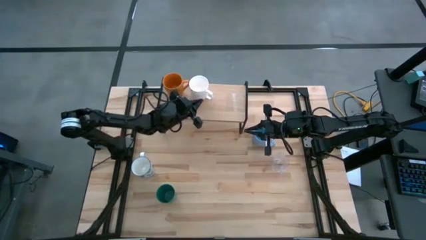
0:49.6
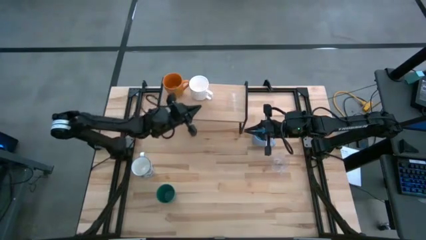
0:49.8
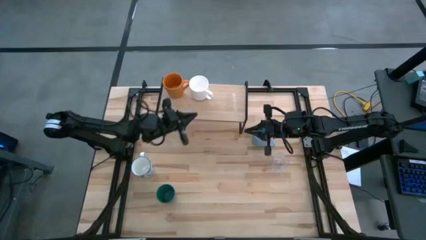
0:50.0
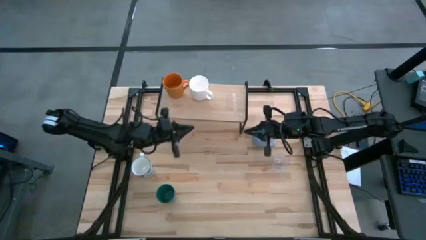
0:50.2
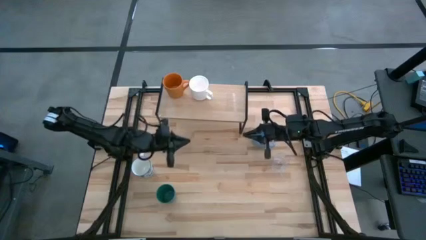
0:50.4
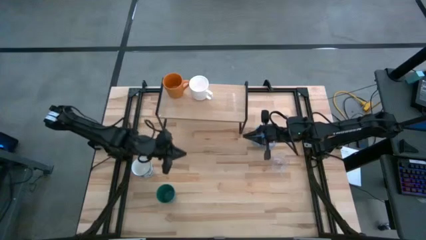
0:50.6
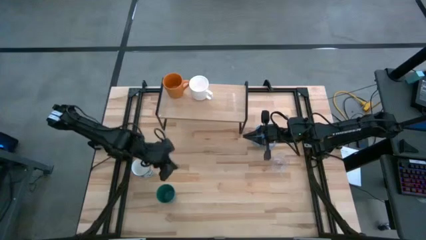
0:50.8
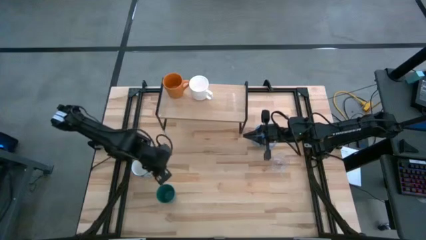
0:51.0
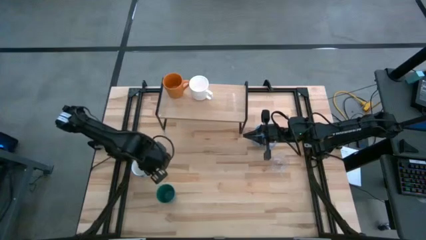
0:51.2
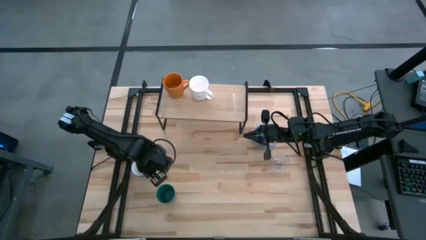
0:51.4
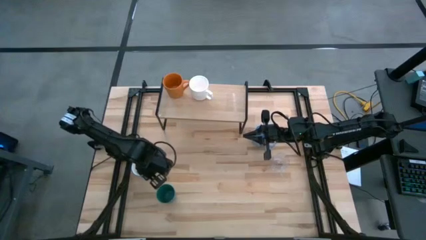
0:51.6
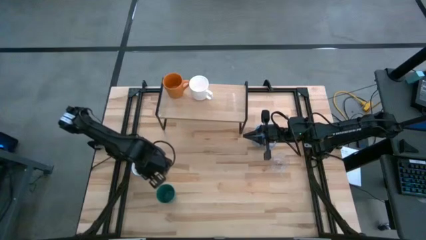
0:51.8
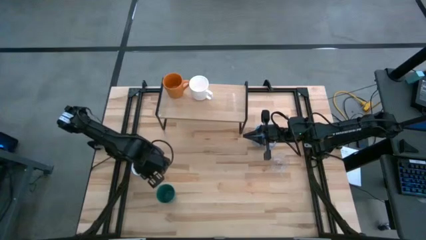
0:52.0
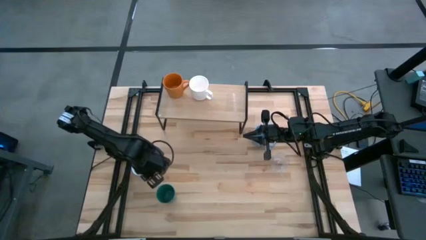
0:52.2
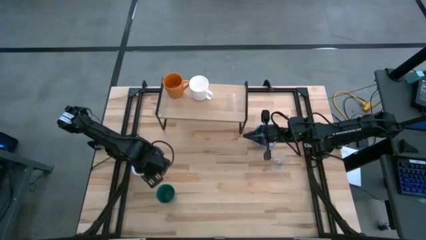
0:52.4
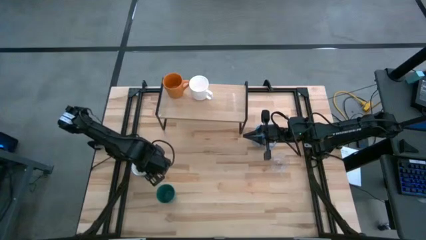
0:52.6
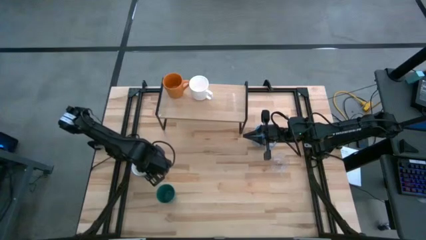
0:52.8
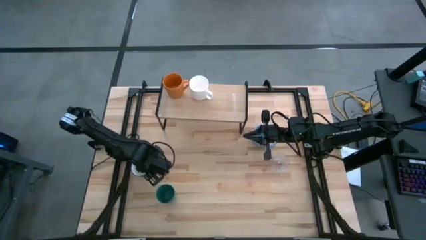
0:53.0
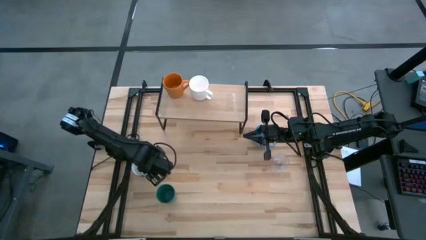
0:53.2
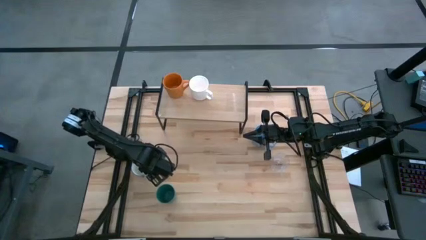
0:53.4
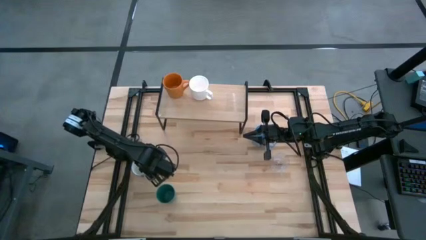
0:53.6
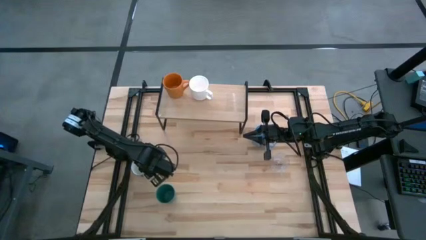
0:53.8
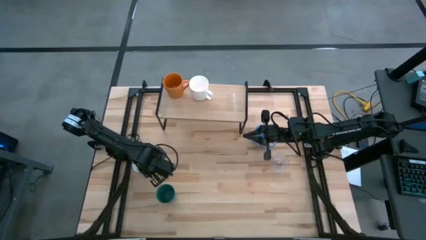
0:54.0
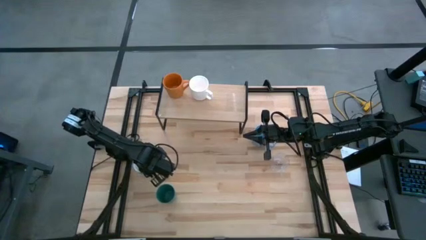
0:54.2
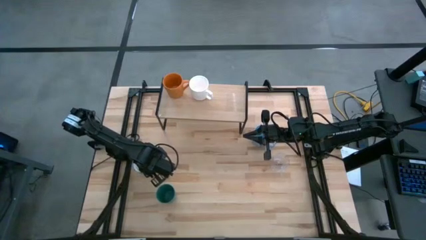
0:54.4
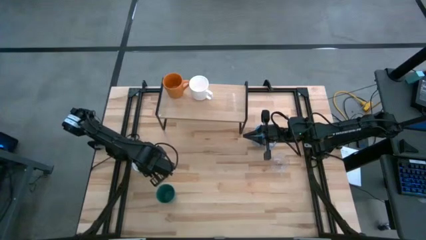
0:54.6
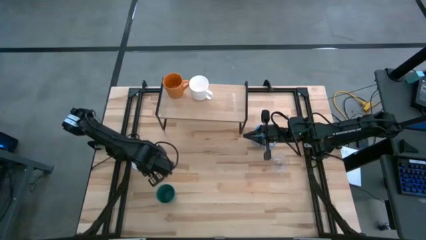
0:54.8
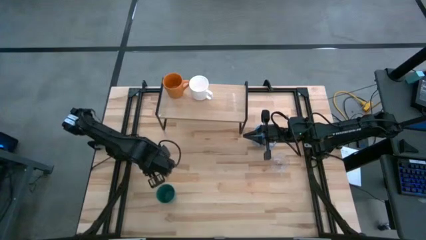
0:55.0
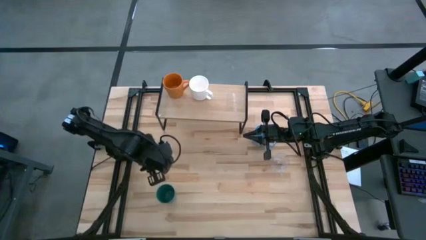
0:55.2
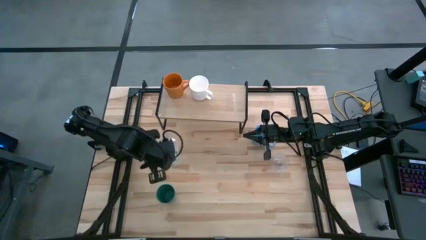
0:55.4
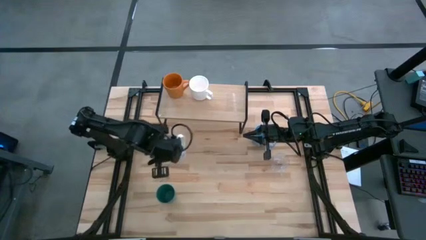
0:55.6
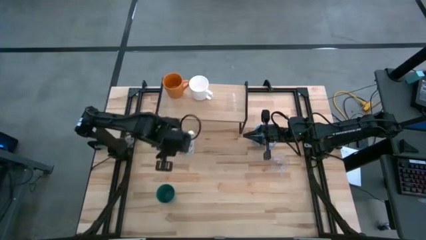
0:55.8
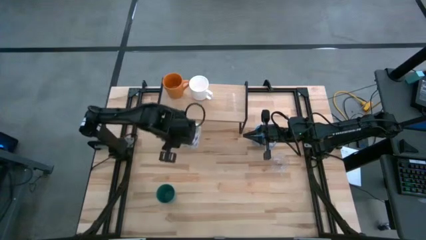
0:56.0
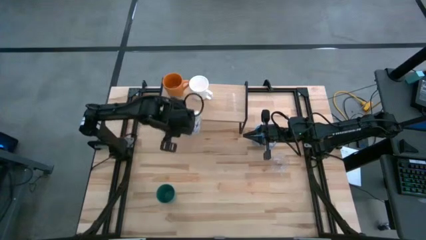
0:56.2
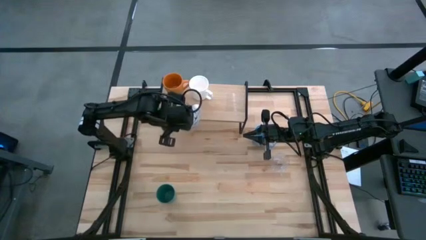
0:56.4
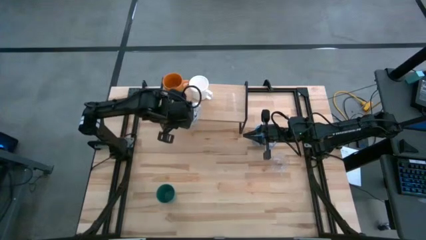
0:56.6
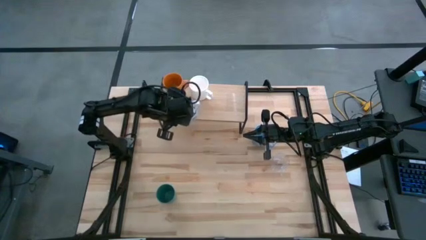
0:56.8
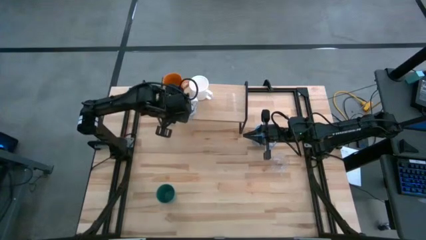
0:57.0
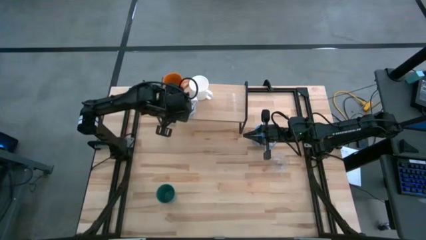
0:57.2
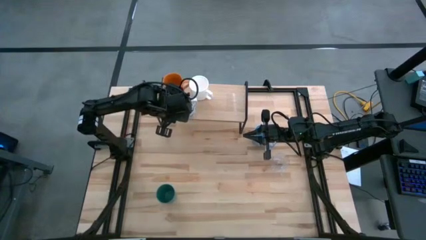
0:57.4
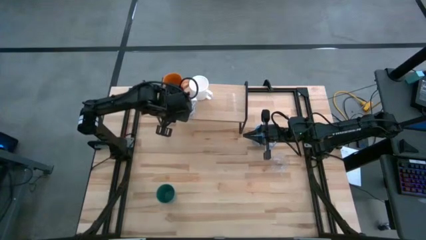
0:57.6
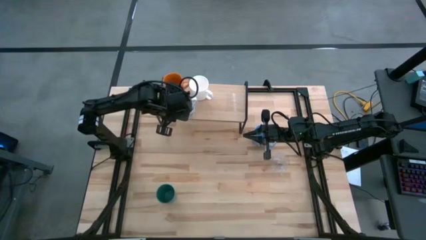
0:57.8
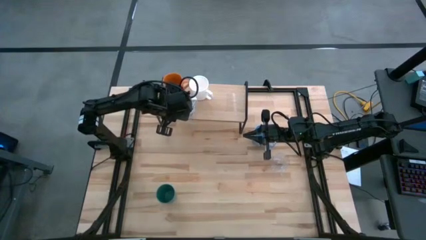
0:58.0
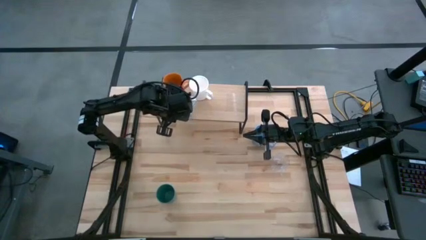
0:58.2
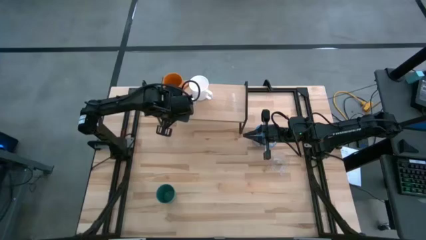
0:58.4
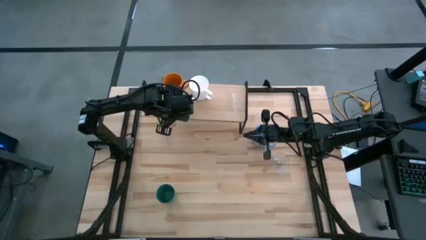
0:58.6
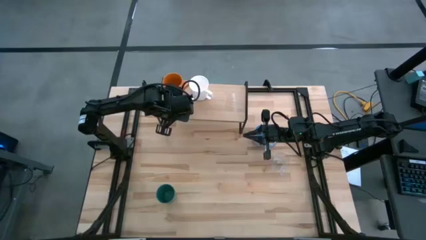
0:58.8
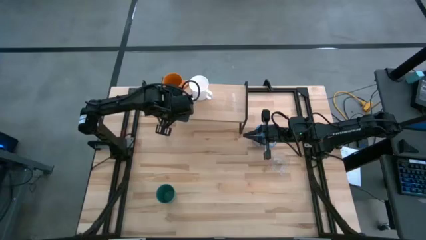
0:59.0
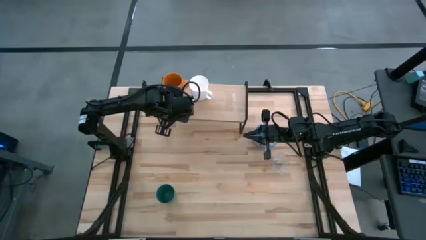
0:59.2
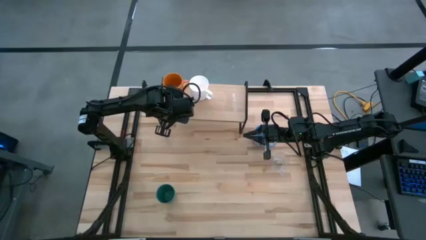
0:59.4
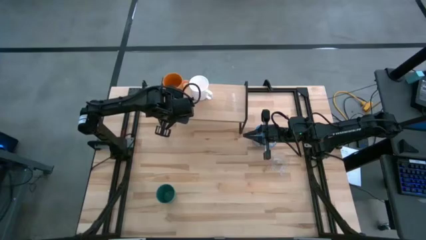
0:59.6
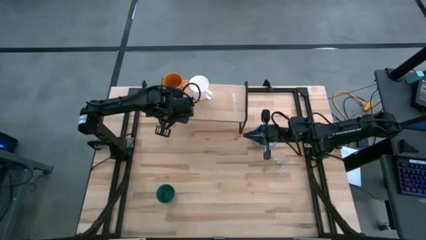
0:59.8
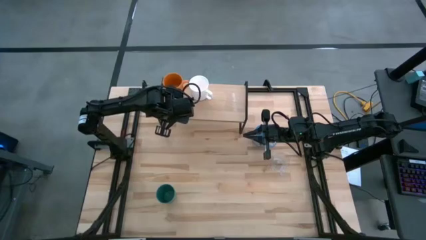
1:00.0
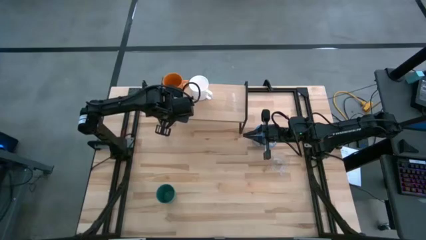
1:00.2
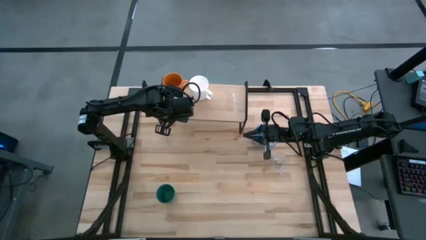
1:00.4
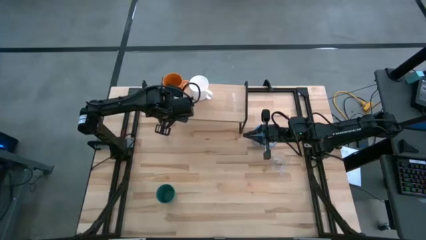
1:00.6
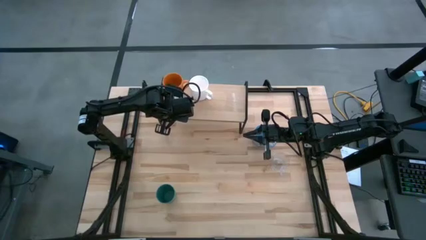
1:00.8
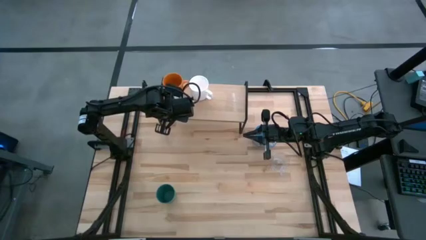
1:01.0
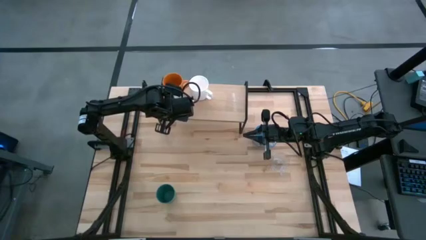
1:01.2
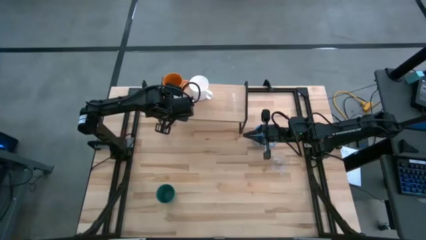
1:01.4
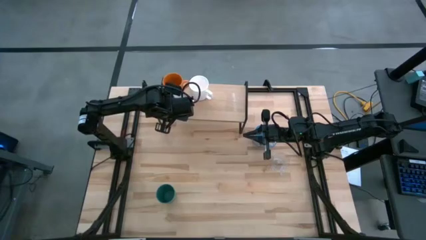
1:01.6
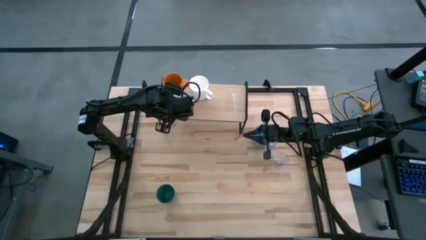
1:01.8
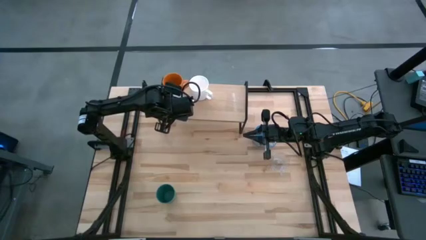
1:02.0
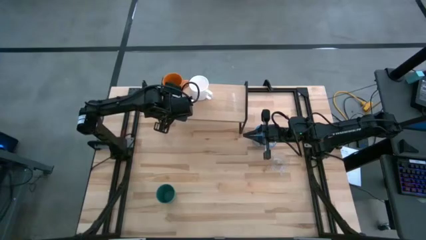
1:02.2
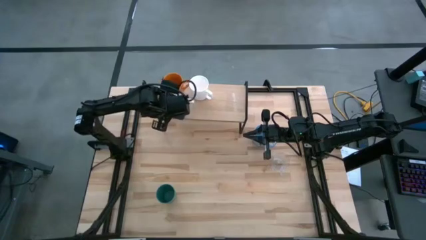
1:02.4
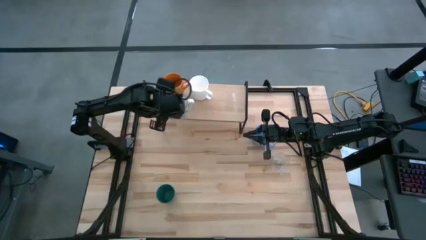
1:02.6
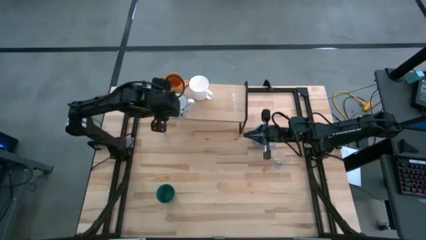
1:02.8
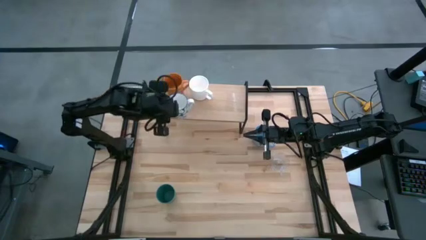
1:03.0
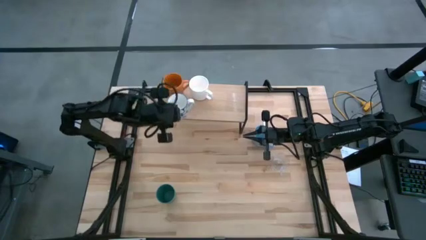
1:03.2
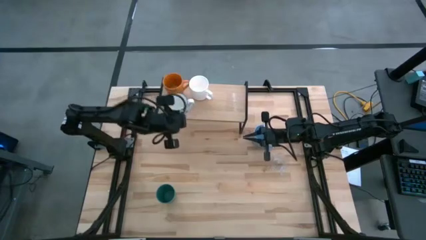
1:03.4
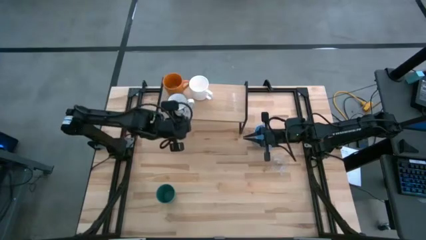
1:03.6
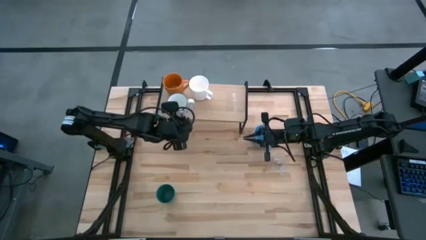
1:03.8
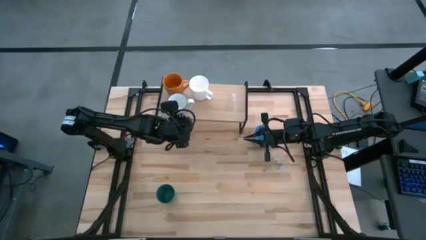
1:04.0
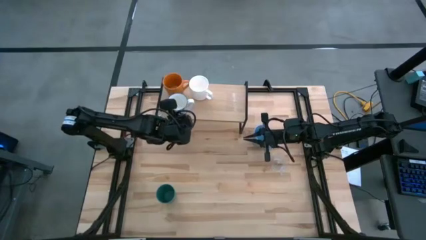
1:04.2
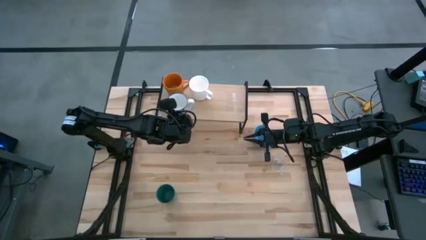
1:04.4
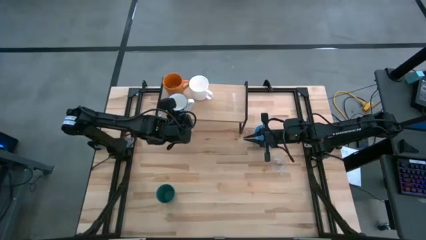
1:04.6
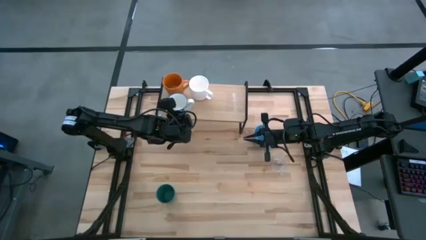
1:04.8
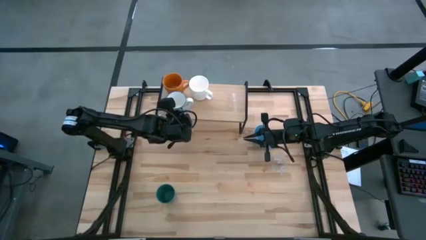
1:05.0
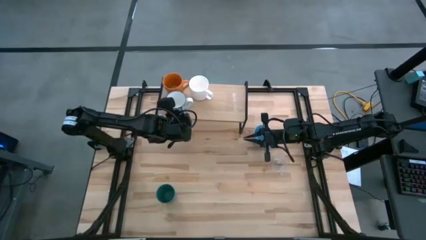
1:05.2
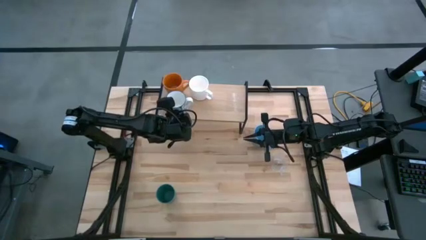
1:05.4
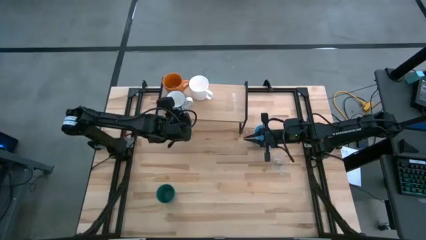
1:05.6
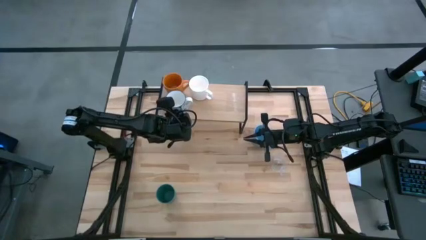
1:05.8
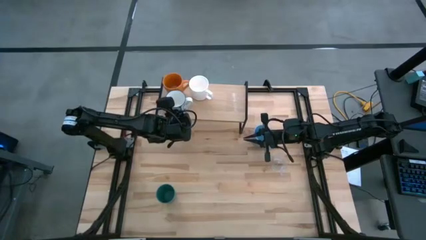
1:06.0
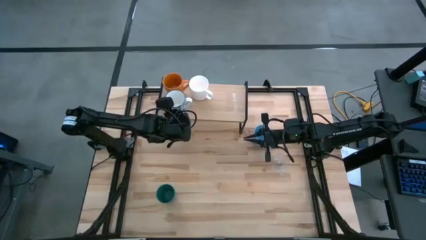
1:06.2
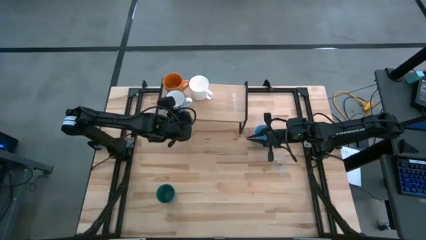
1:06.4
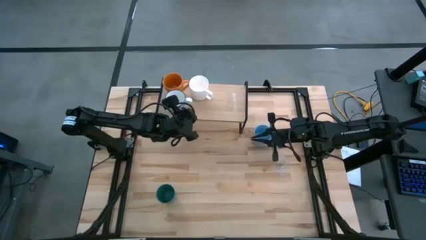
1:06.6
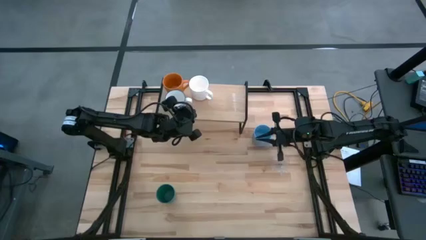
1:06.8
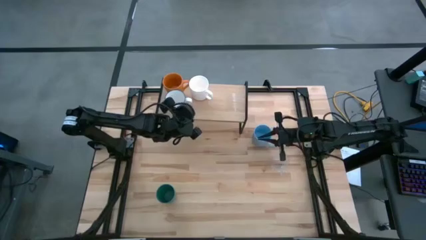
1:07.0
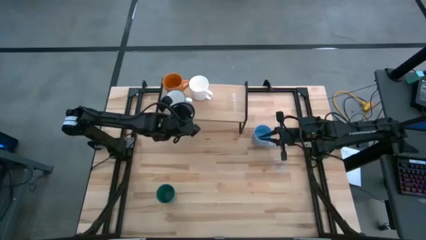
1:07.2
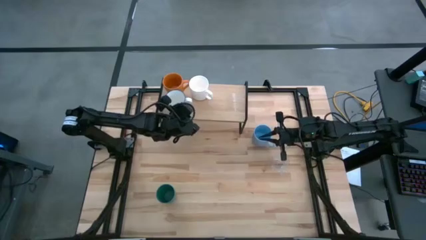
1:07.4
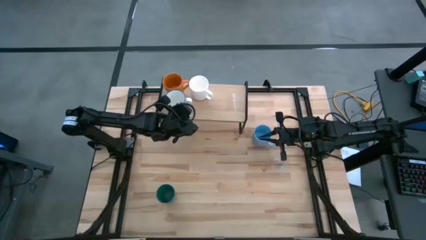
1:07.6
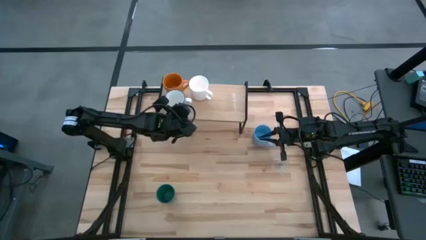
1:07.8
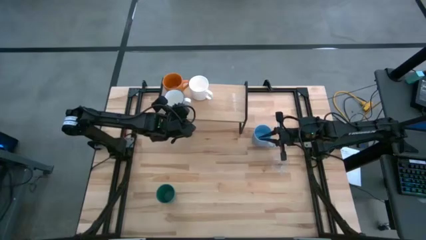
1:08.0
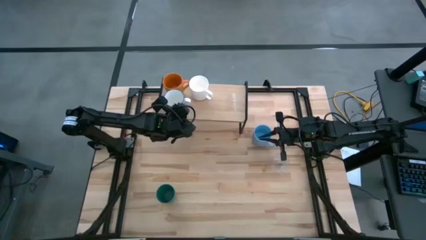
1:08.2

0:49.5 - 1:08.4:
Task: Stack small to large cups/mugs on shelf
Put the blue patterned mug on the shelf
